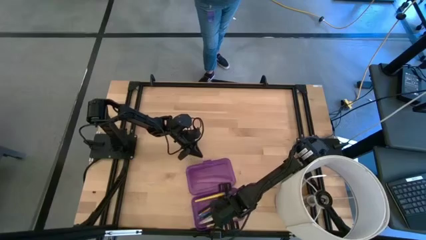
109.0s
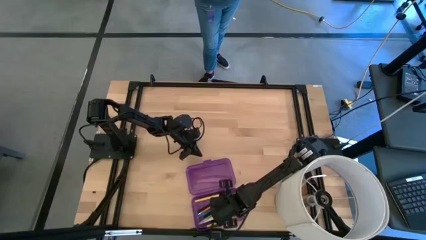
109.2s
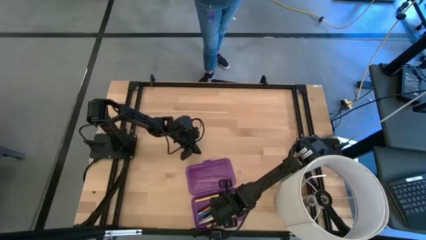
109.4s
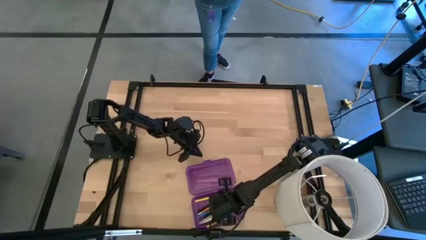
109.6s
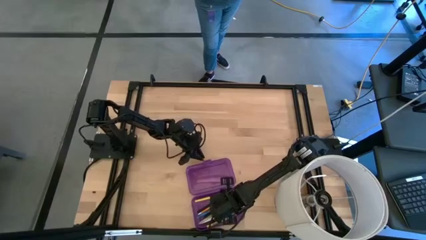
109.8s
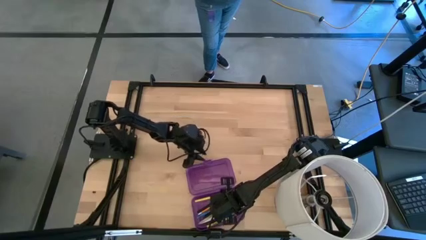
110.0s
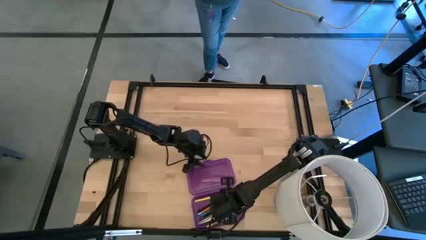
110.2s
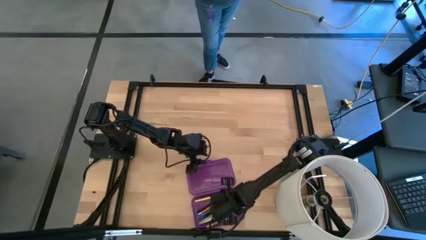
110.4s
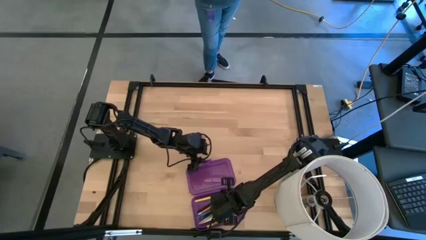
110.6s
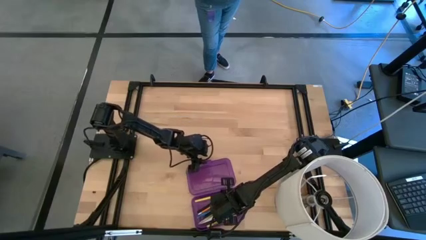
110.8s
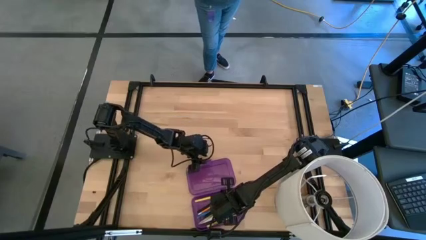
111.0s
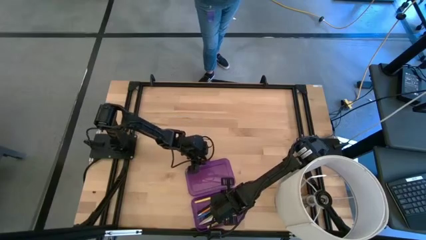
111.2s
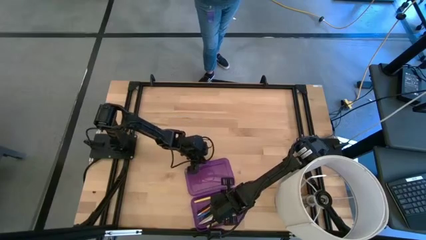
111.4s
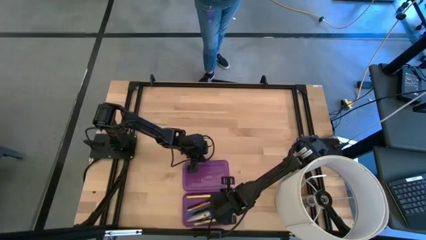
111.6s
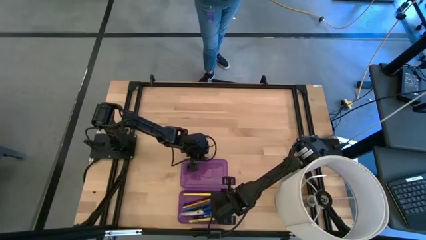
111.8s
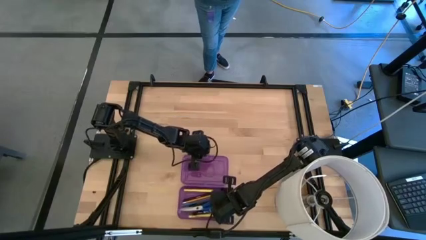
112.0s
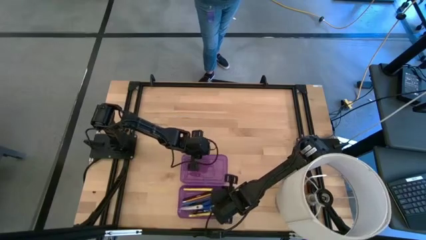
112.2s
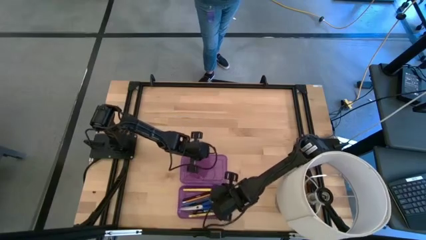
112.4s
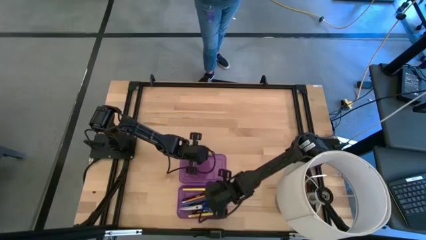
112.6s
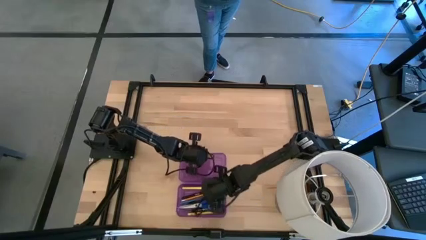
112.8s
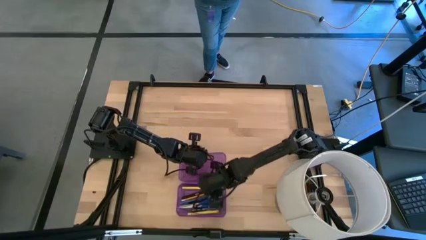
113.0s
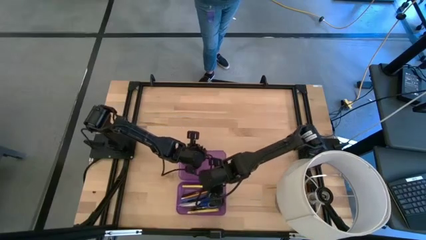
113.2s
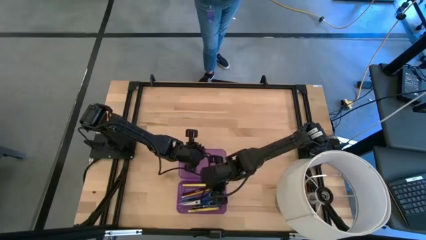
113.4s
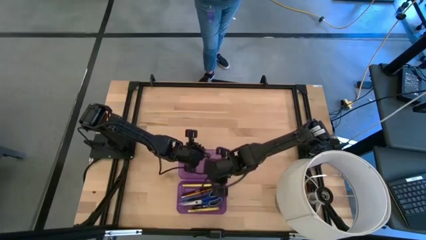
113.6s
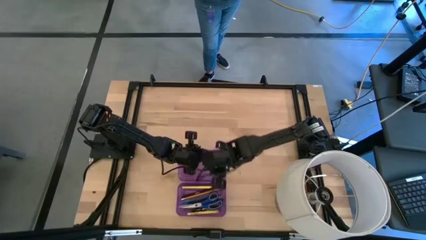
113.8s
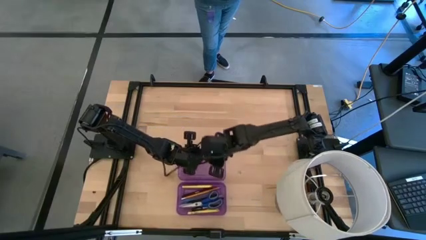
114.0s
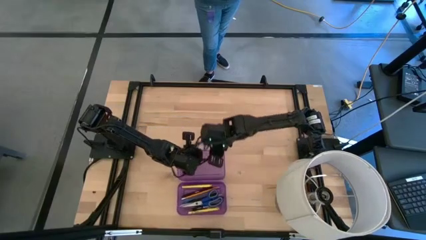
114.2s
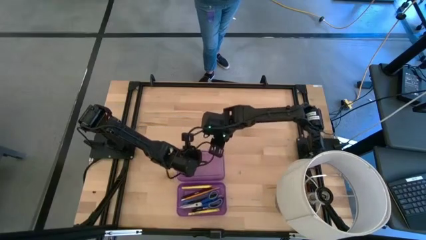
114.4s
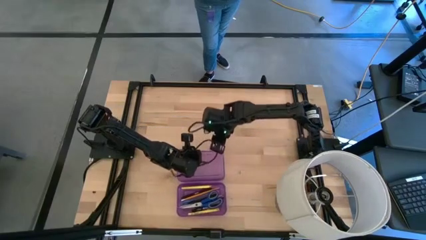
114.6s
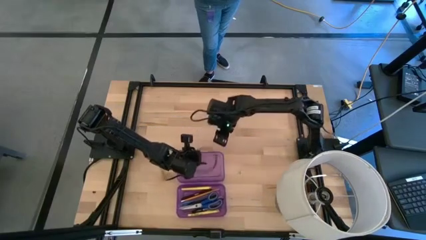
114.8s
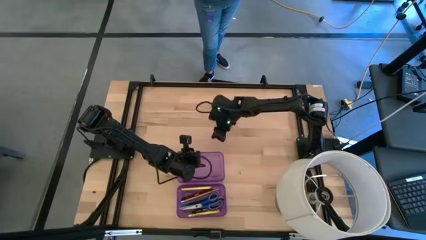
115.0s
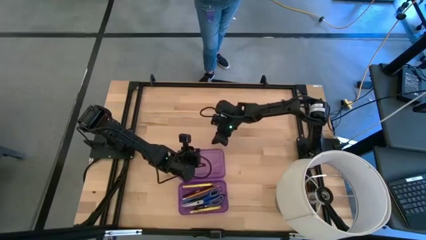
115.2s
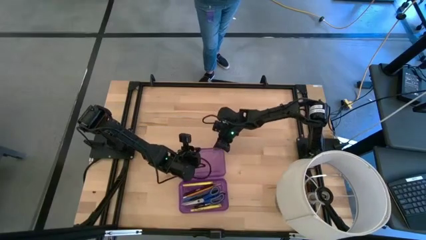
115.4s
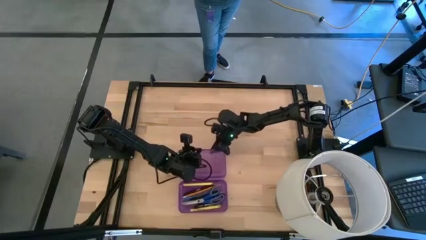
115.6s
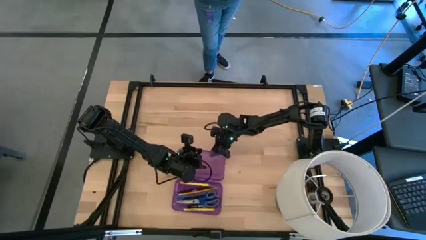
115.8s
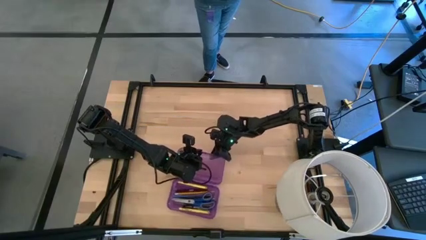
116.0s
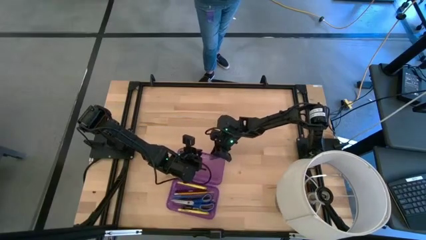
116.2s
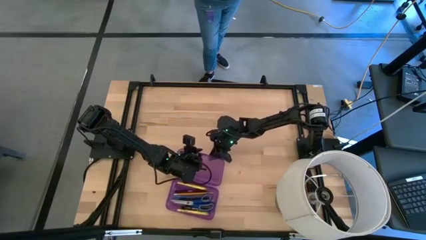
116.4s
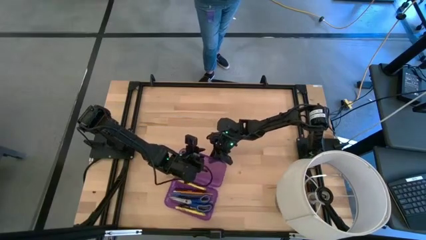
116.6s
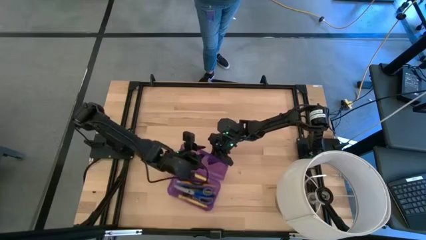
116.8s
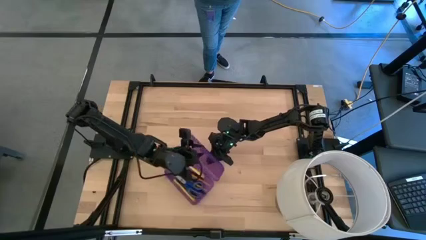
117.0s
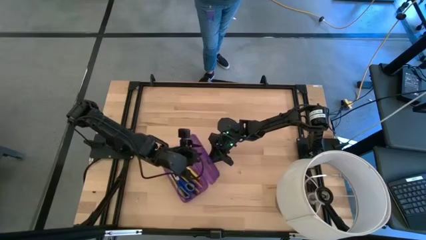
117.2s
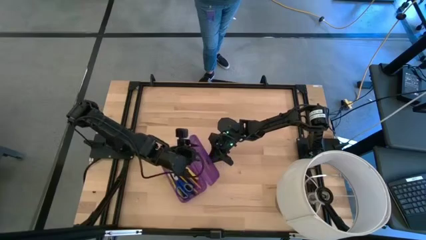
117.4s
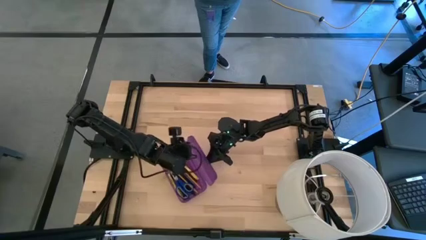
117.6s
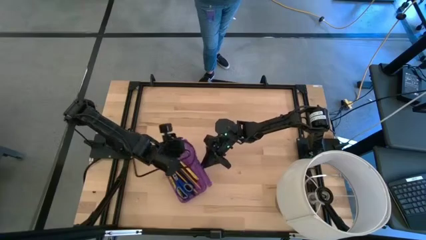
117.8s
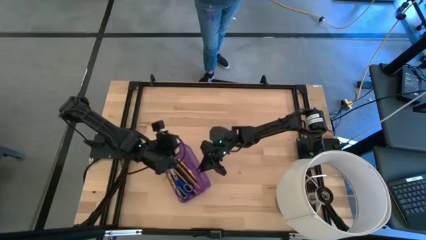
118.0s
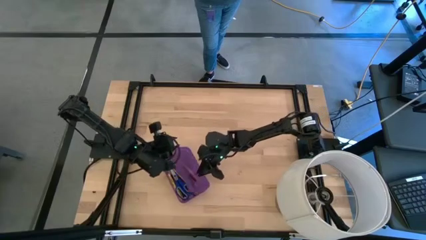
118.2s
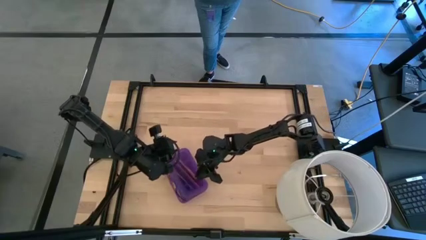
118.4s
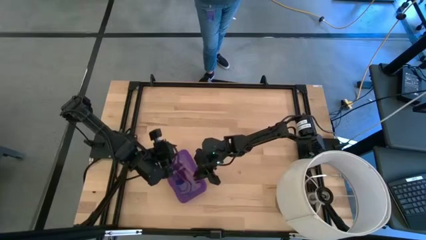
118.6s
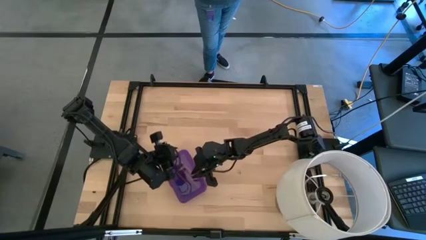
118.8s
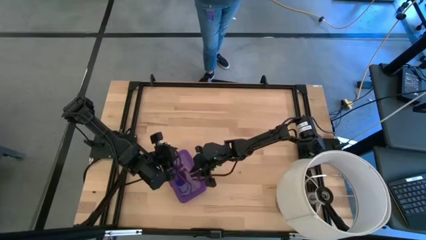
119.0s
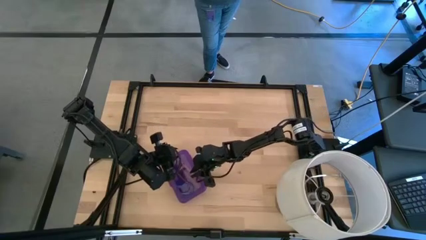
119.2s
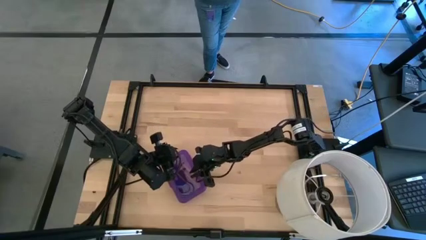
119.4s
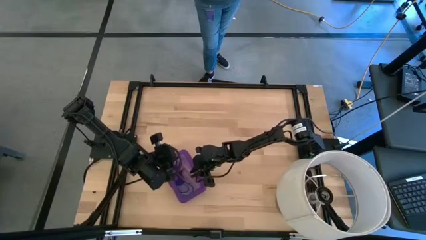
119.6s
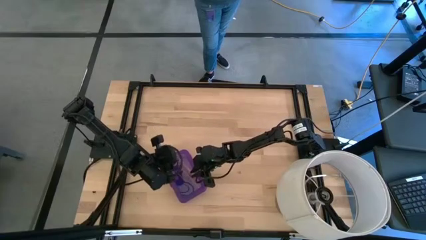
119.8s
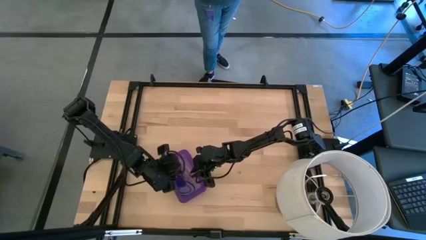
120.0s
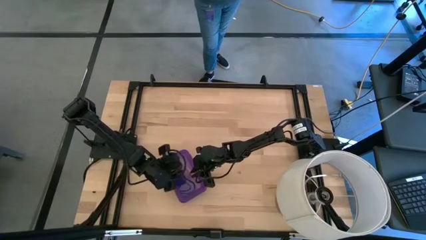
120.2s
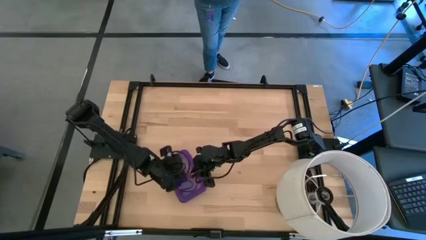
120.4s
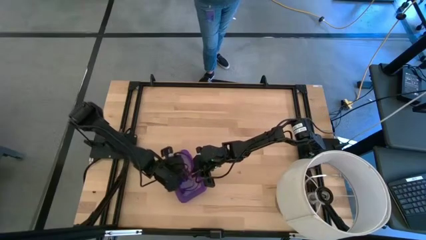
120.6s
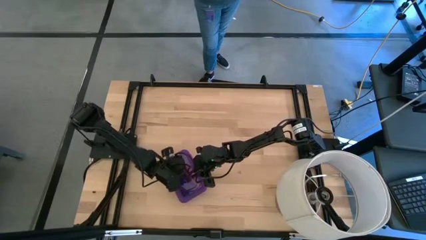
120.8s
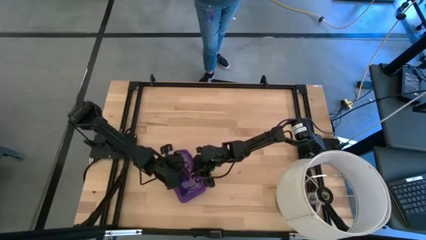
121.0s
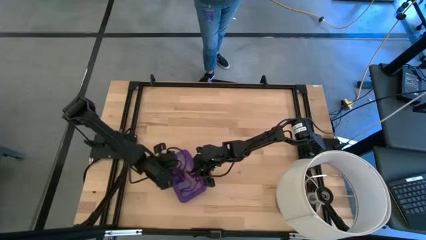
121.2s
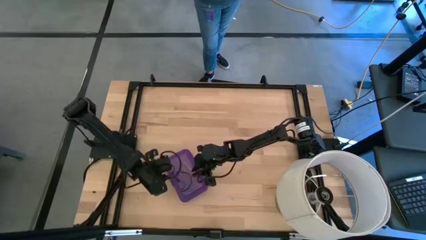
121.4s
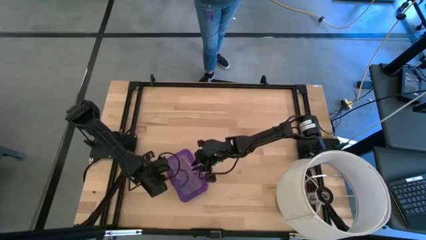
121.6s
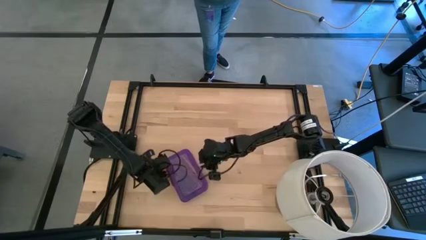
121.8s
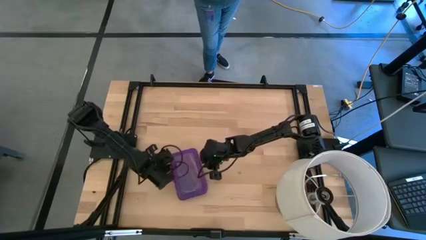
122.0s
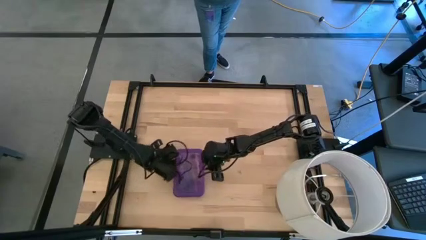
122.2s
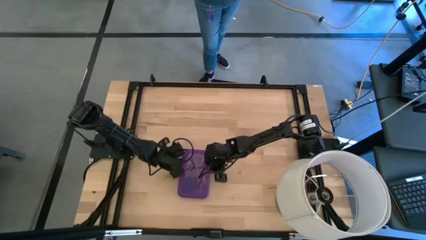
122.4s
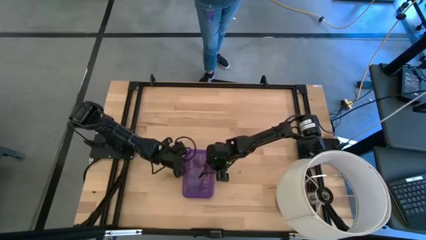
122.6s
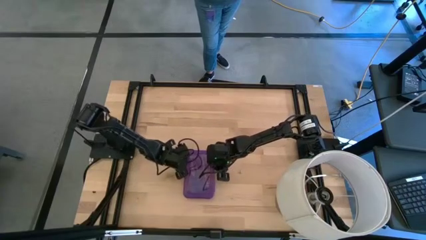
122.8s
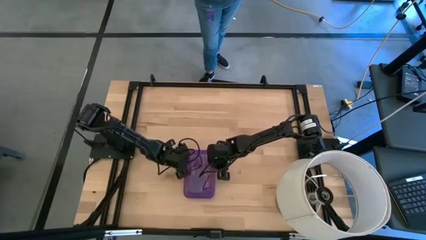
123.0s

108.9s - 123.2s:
Task: Pick & place school supplies into a supply box
Close the violet supply box

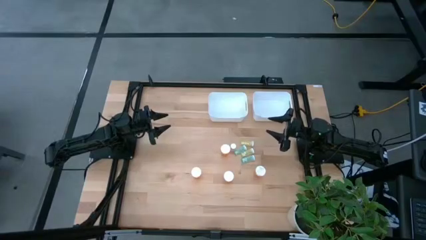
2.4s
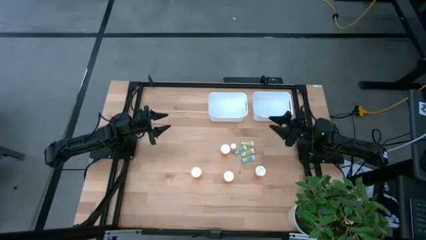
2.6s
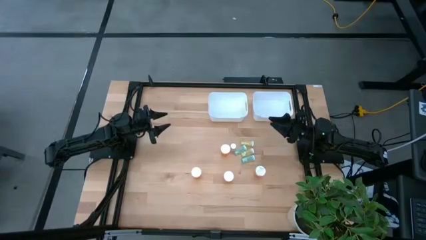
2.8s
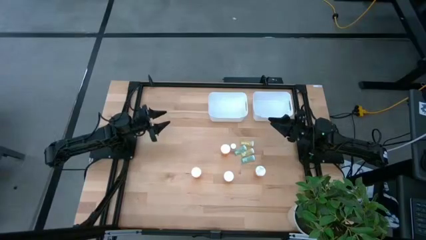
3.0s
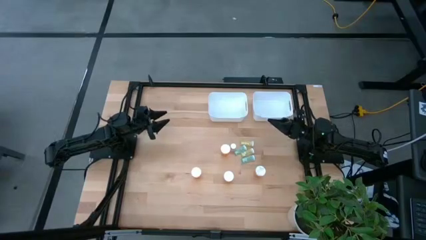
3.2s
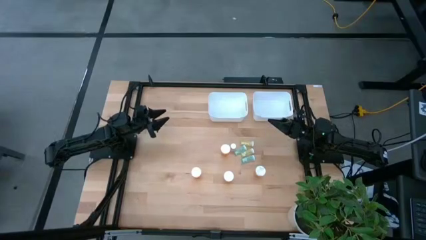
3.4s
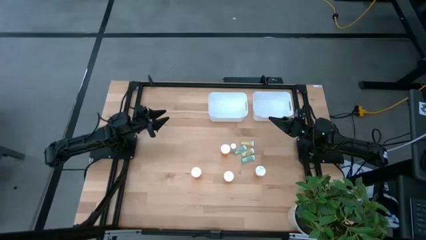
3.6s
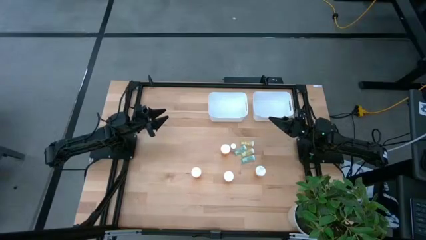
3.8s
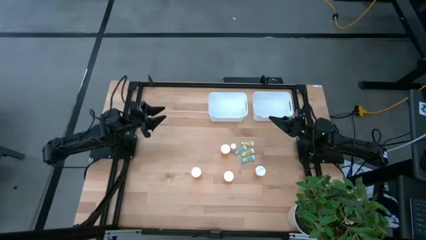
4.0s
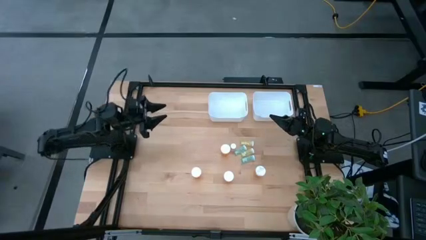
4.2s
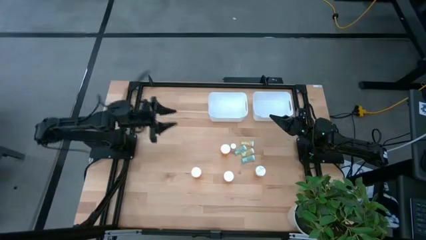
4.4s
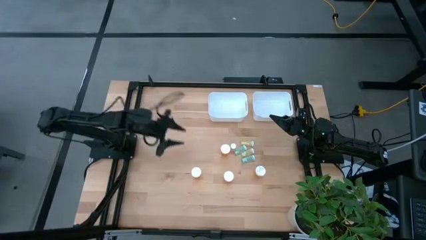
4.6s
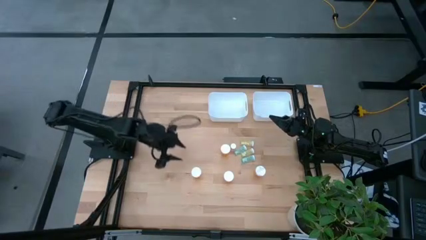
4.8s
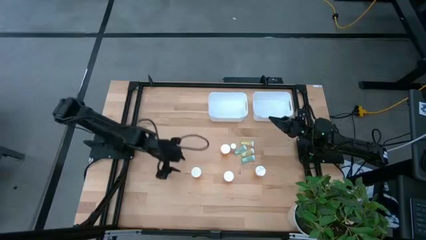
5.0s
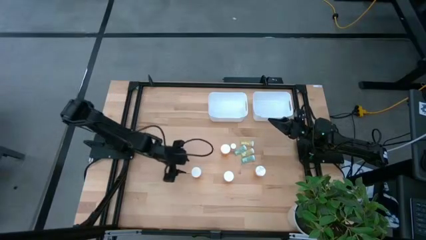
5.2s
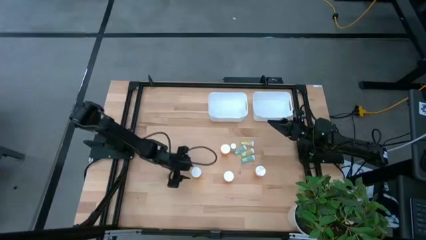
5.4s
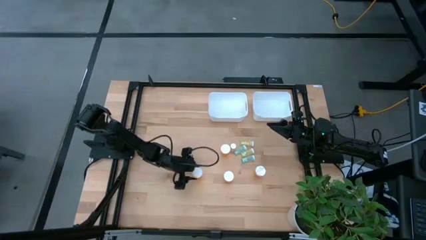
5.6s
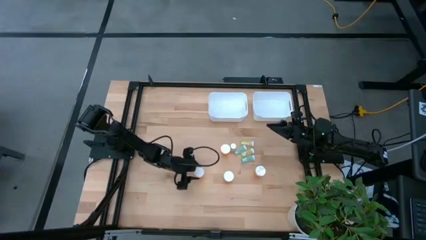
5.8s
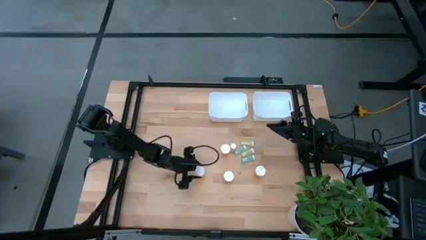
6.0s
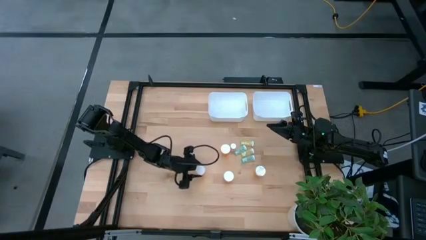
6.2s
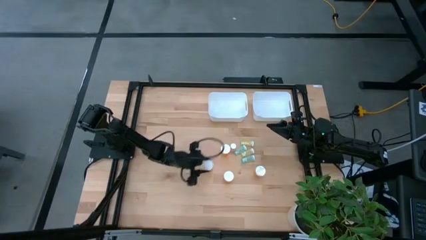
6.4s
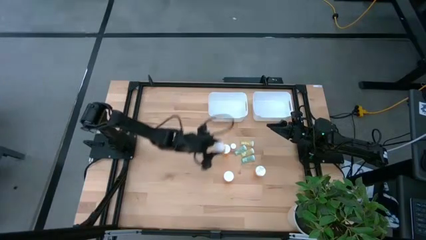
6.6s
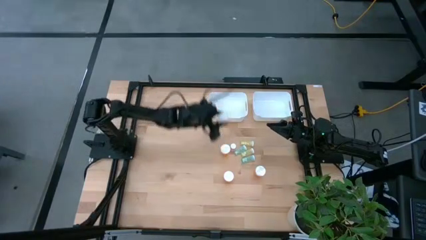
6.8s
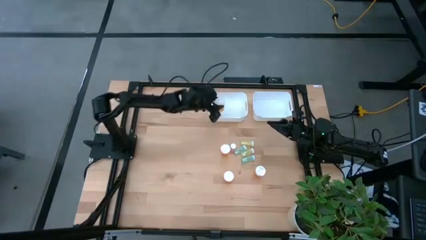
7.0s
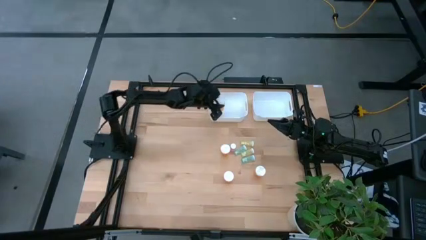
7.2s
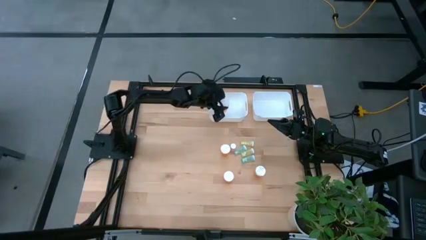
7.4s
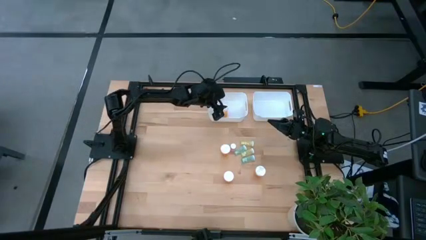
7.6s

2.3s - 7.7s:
Task: Pick and place medicine bottles into bin by pill shape (circle, oval)
Put the orange capsule bottle into the left white bin
